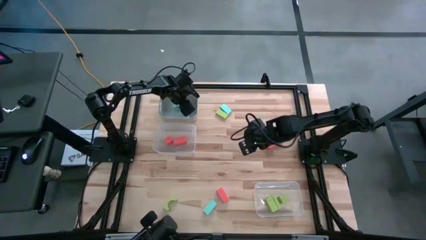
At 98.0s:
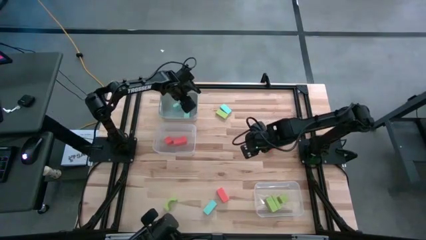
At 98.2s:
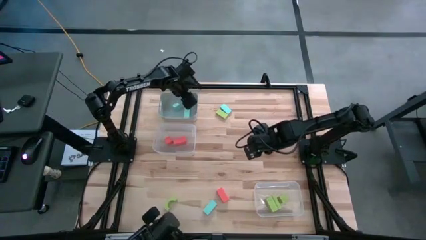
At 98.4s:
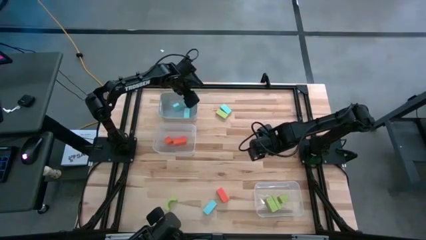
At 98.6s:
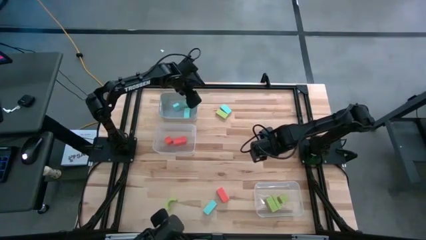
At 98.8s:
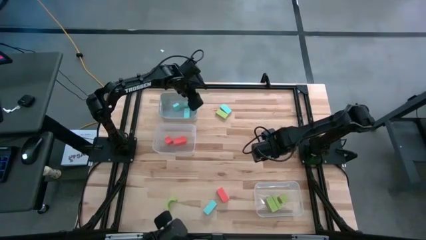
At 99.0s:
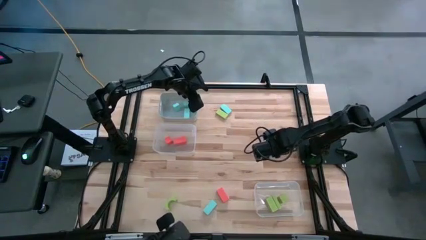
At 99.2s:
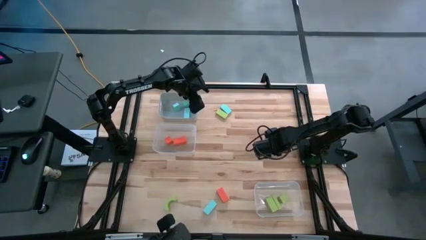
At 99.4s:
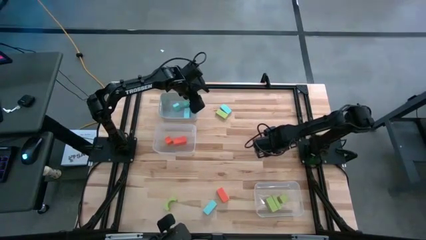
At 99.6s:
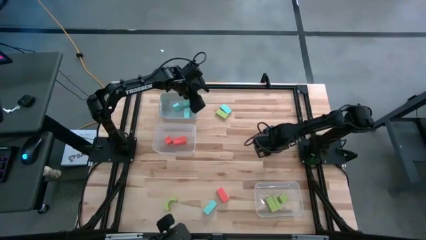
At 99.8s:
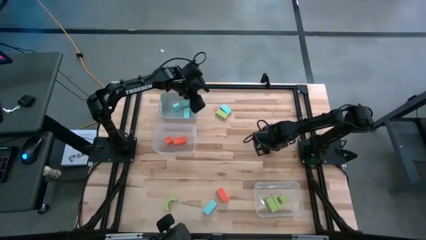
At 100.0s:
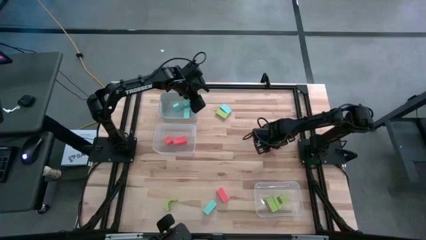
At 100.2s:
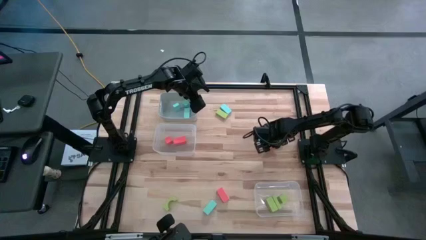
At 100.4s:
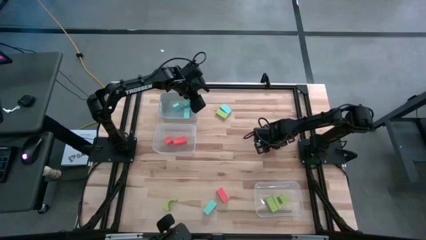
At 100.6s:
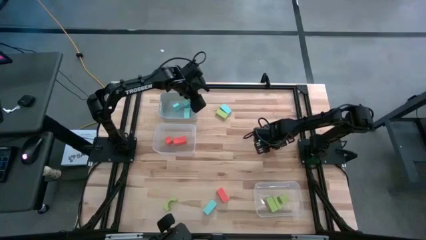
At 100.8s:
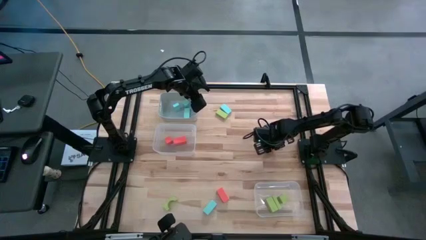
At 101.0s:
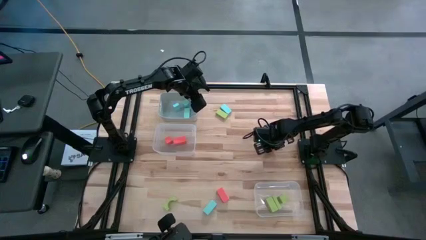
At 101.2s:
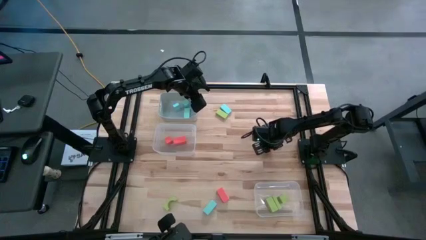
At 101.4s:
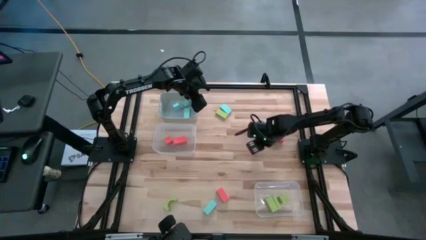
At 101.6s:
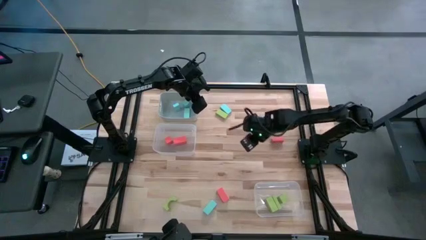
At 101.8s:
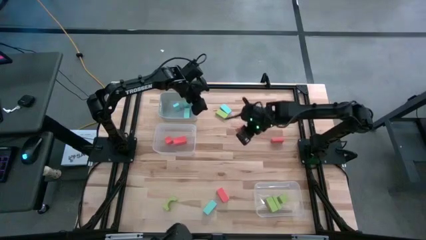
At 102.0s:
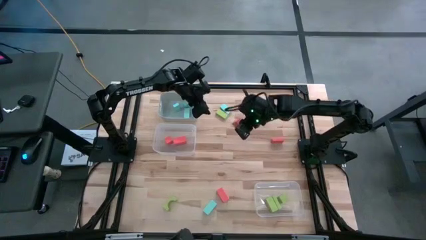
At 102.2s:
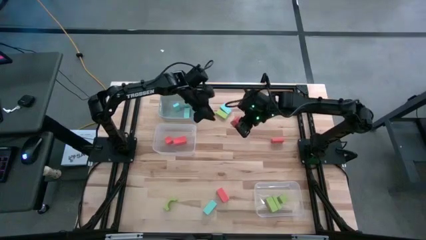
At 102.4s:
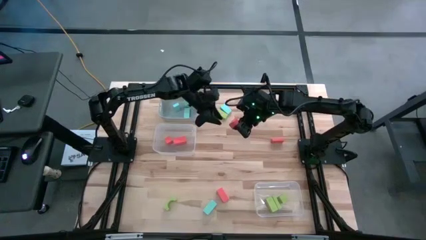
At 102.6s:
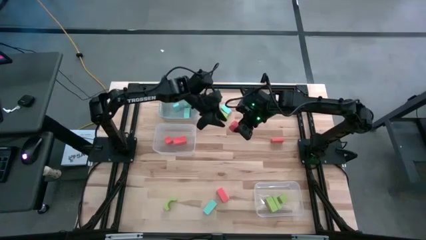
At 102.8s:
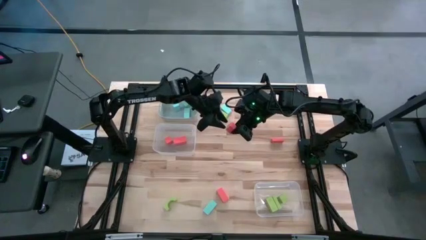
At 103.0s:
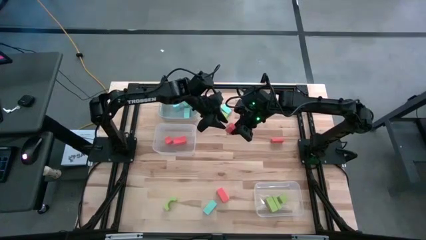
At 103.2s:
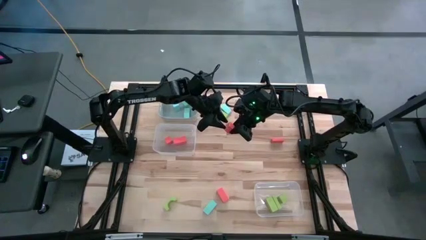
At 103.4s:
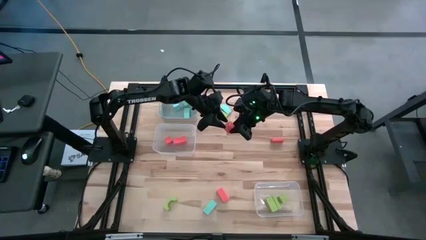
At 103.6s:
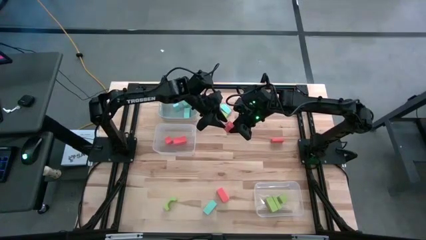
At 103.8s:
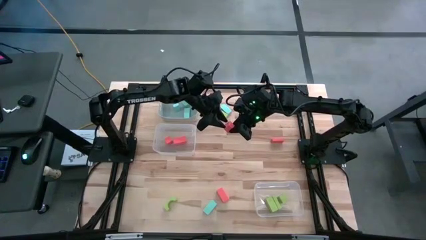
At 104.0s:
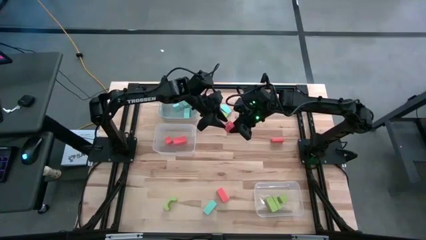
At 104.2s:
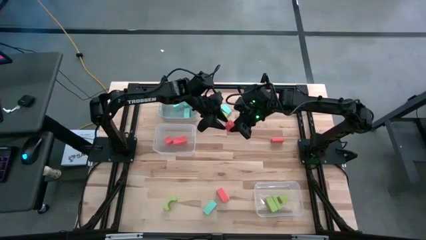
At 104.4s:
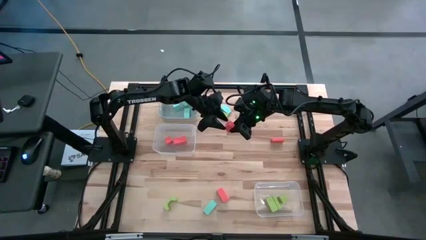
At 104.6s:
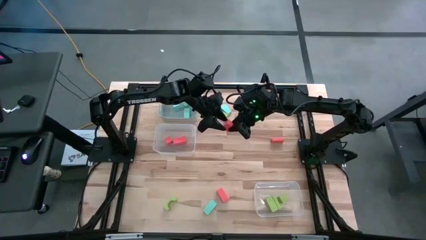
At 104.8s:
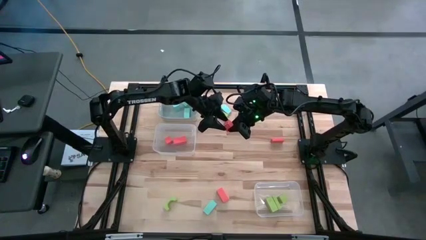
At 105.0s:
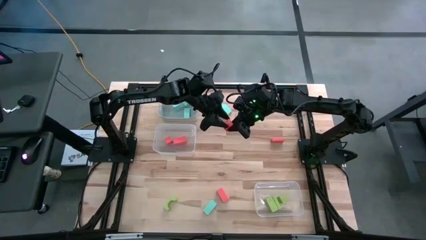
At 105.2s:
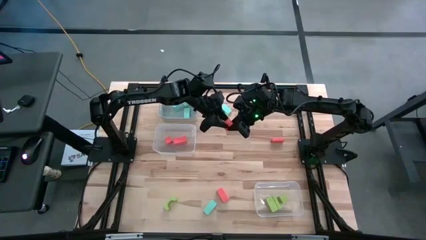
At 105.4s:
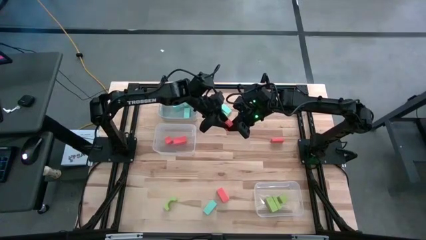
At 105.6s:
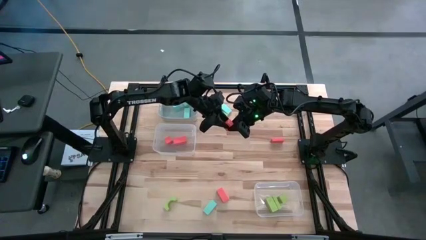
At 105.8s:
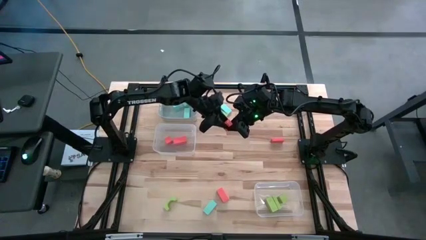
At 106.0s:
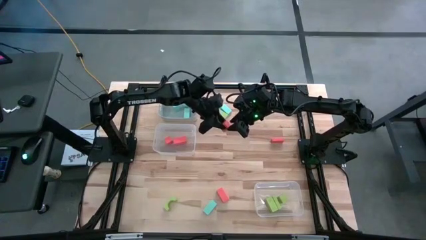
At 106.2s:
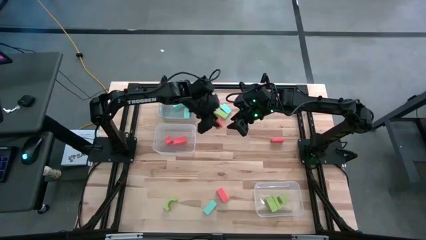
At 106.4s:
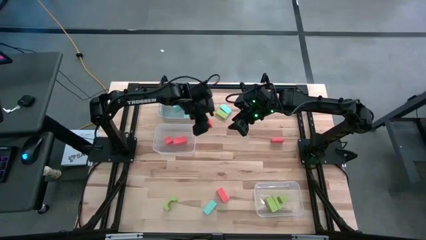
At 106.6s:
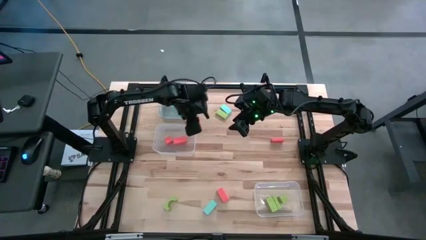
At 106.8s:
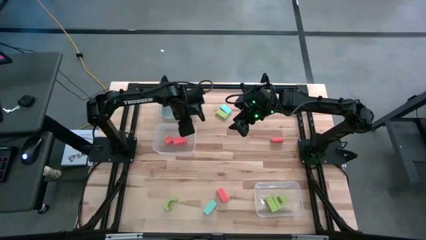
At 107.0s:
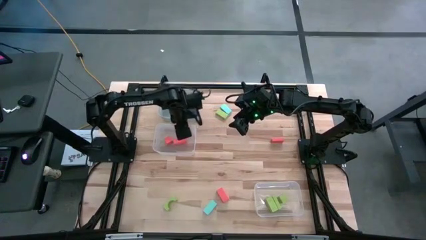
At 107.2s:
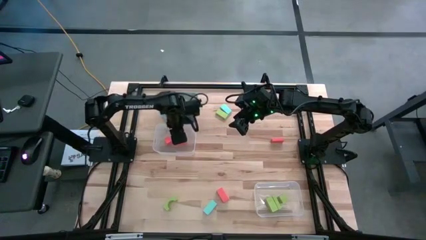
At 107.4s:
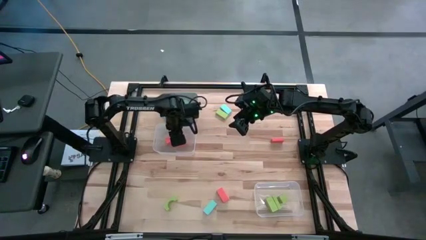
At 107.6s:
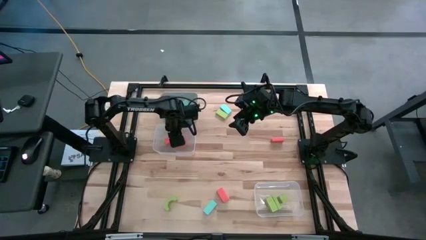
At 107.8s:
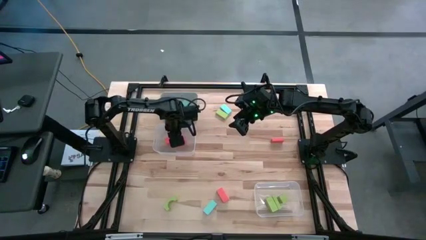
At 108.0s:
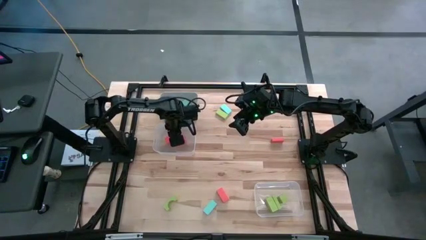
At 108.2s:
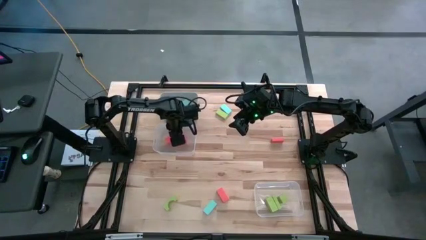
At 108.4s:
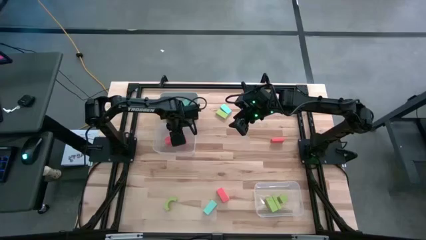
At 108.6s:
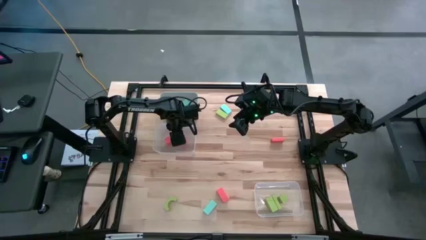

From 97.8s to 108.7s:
Task: Sort & place blocks by color
Put the orange block into the top transparent bin

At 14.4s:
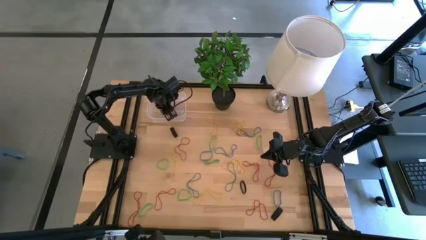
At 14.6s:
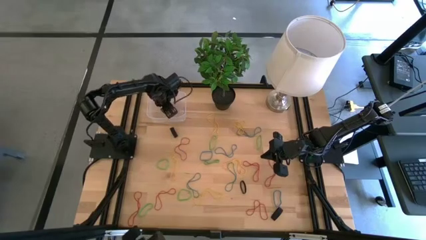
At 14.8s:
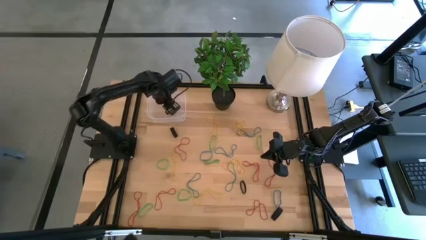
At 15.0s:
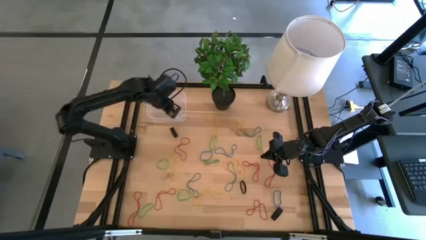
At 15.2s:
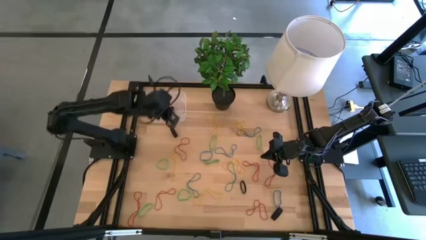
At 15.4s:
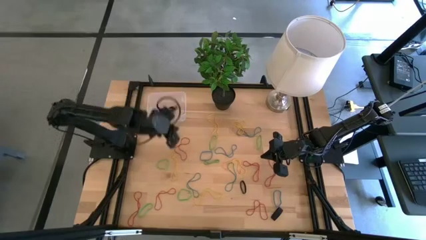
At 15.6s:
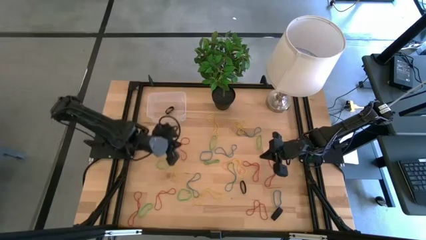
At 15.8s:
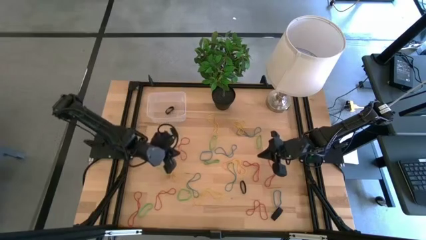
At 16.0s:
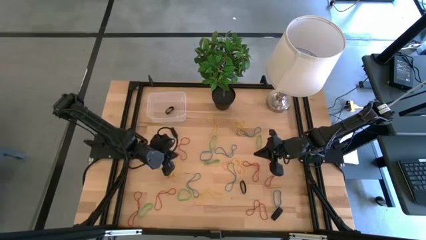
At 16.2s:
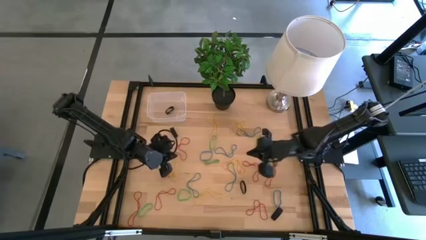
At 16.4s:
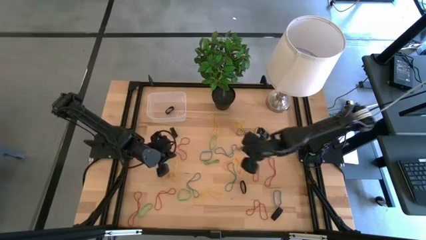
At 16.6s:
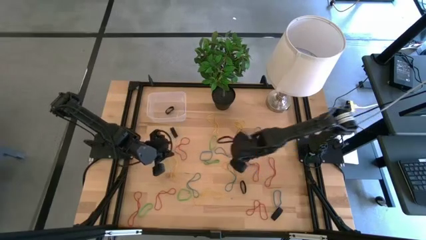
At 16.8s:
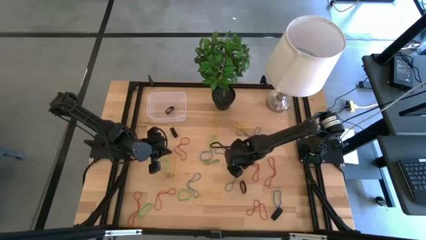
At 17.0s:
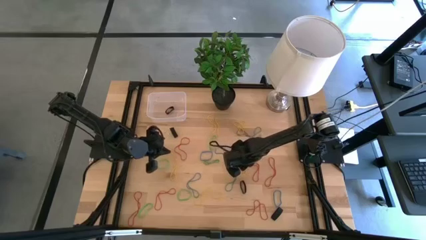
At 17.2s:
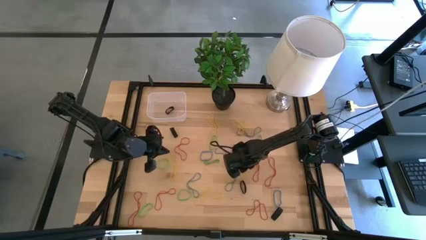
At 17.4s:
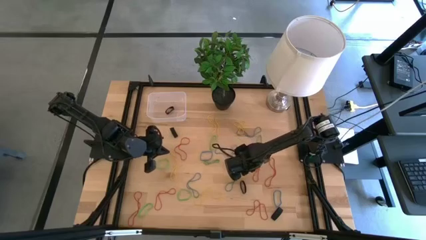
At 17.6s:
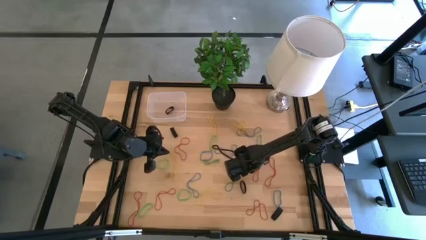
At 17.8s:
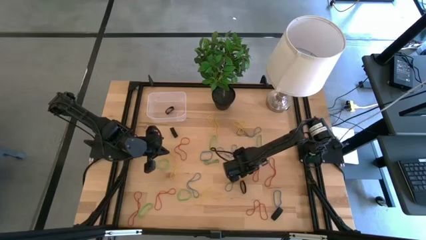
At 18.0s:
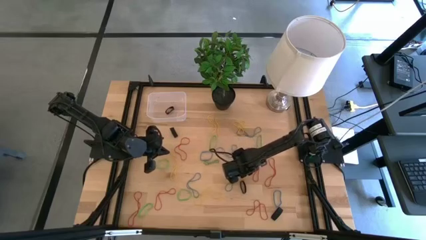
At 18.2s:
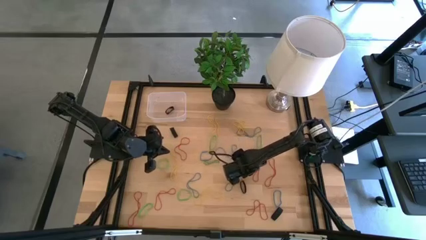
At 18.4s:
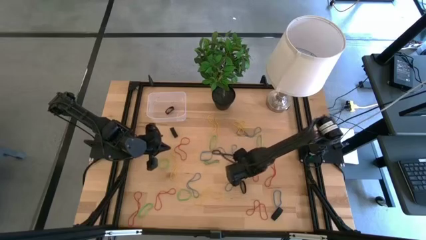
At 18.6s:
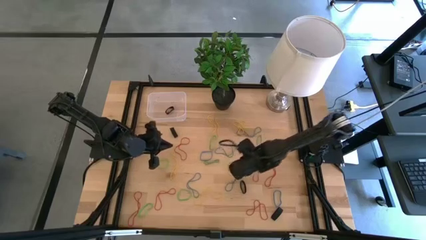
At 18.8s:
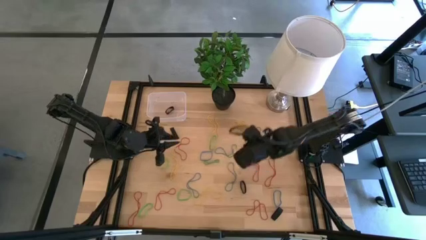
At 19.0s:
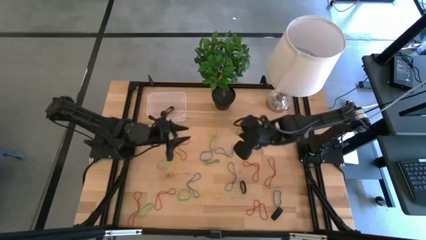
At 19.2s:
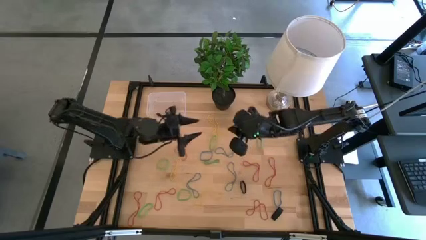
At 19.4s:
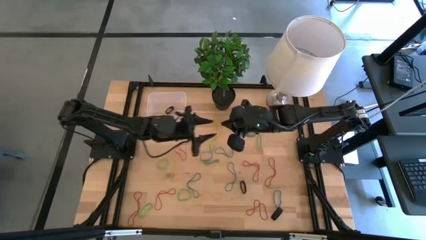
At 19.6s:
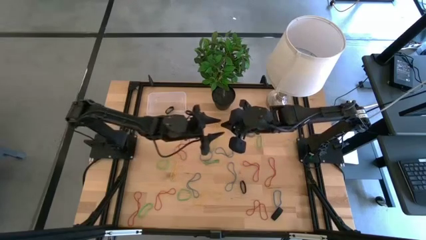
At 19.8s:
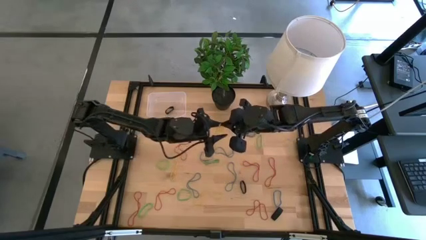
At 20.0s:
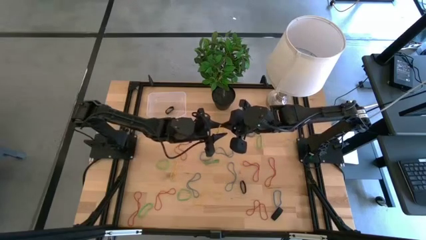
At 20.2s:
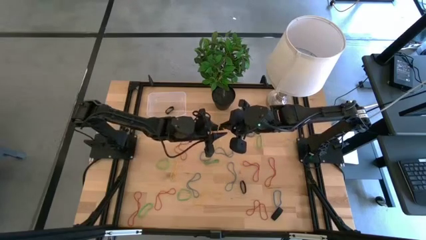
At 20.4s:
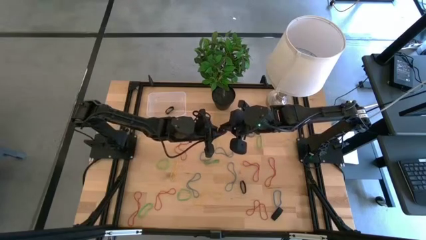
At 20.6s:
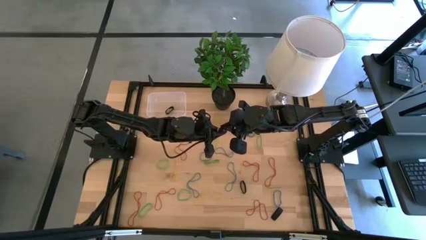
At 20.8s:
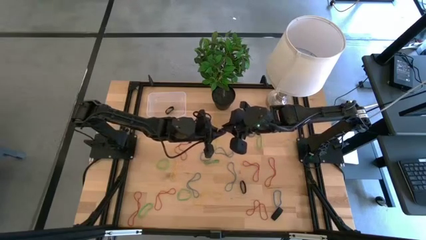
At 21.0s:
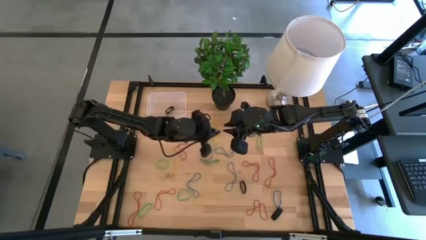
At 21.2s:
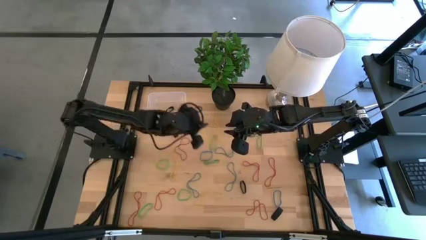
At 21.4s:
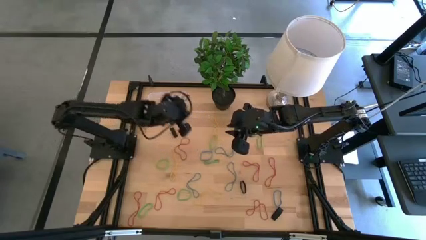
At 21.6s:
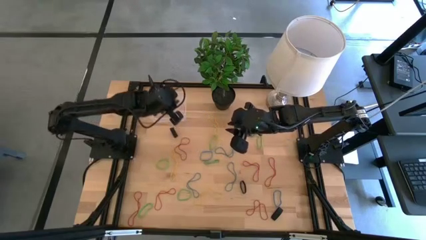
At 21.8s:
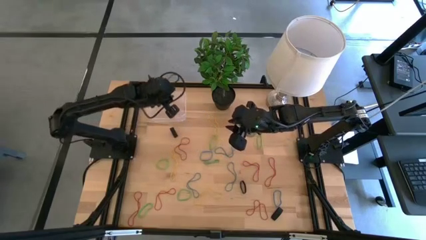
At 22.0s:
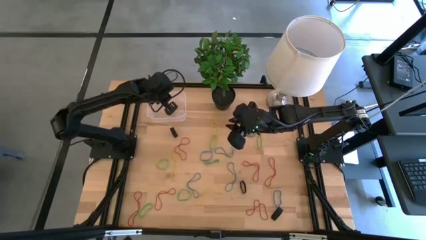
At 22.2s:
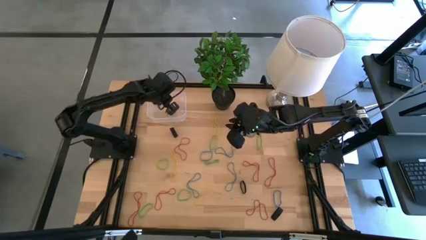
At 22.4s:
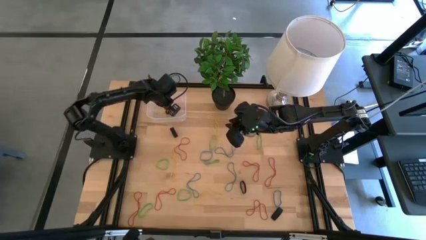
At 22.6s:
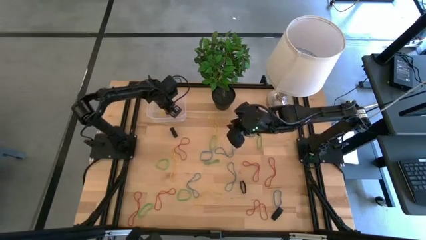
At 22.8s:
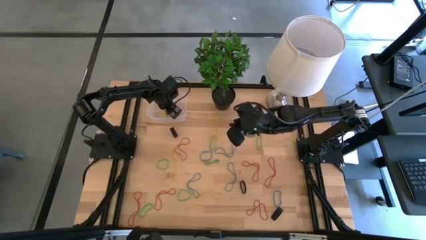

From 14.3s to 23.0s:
Task: Pick and place rubber bands into bin
Put the yellow rubber band into the transparent bin
